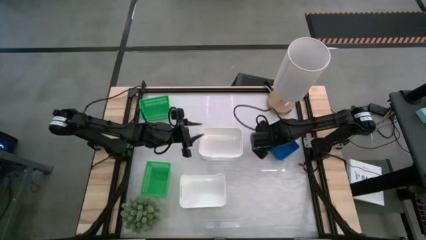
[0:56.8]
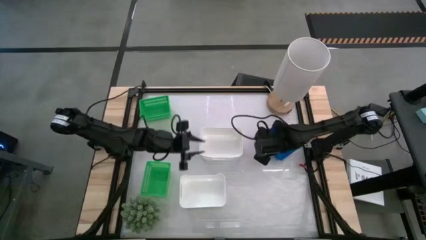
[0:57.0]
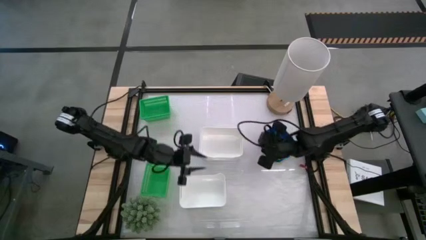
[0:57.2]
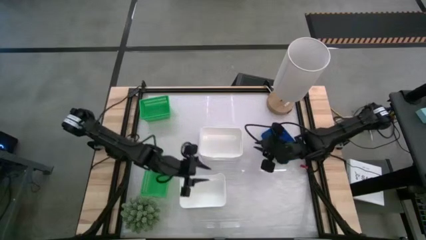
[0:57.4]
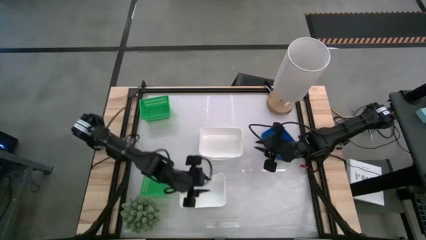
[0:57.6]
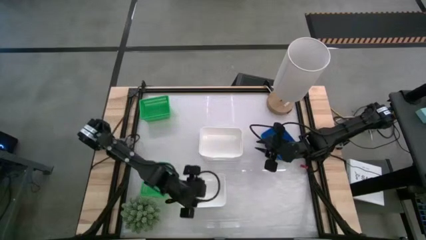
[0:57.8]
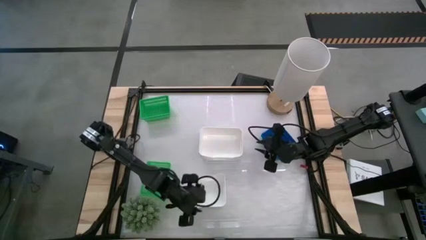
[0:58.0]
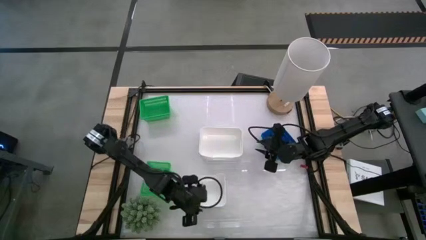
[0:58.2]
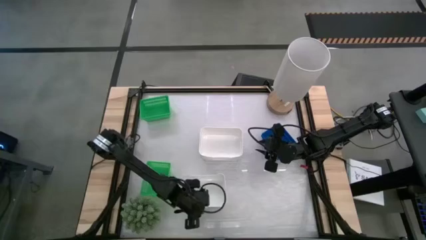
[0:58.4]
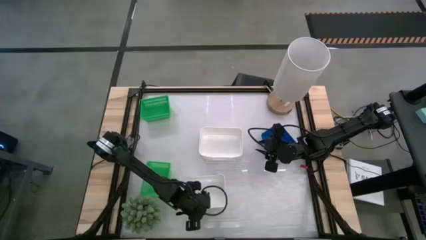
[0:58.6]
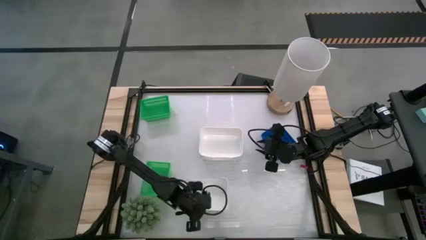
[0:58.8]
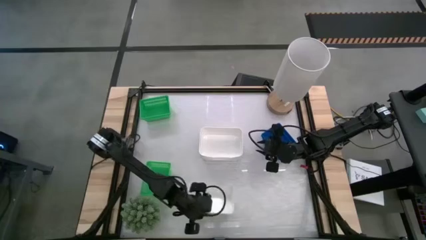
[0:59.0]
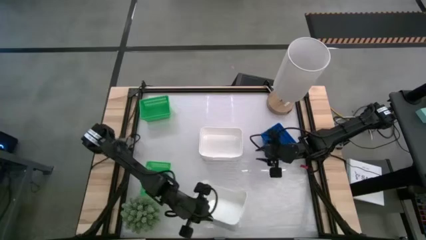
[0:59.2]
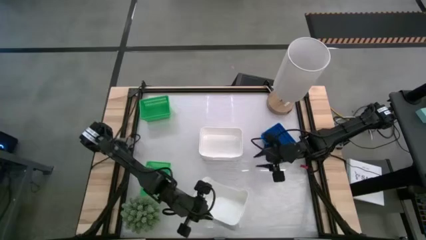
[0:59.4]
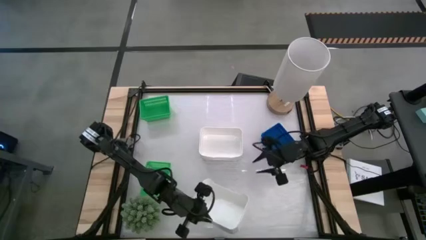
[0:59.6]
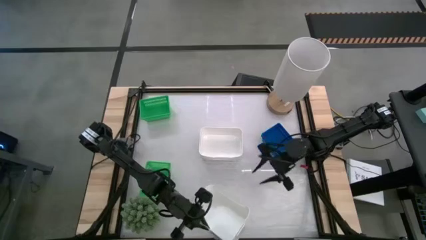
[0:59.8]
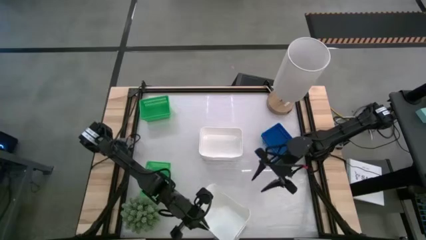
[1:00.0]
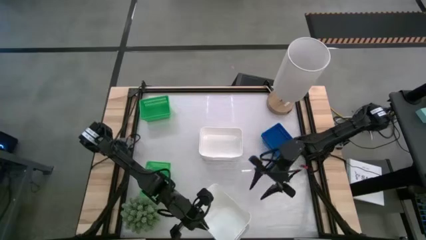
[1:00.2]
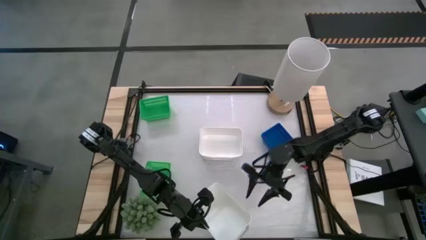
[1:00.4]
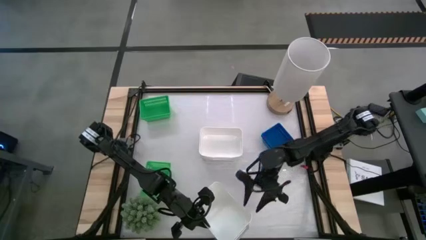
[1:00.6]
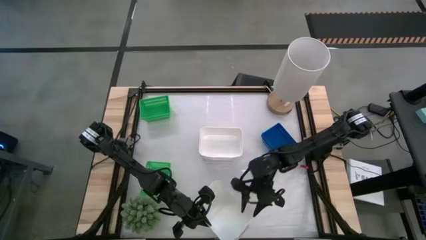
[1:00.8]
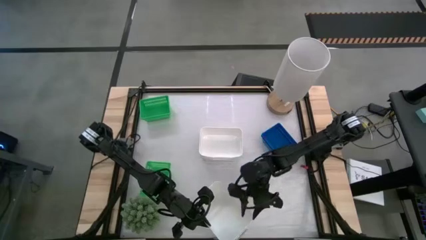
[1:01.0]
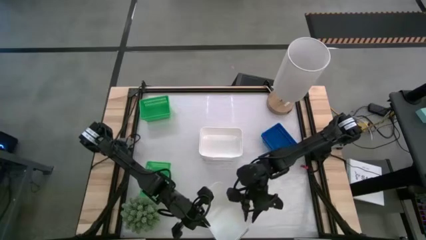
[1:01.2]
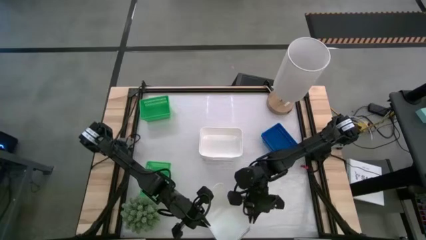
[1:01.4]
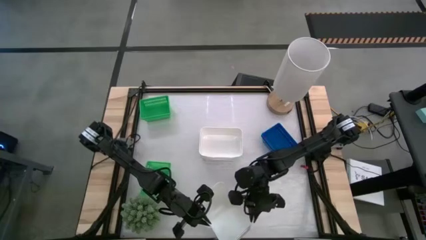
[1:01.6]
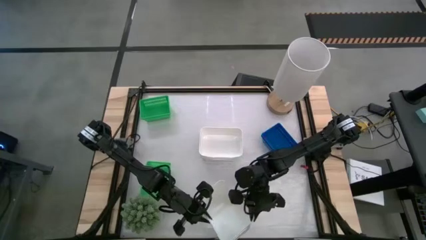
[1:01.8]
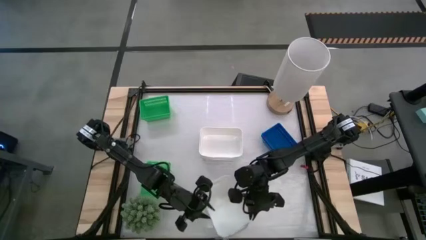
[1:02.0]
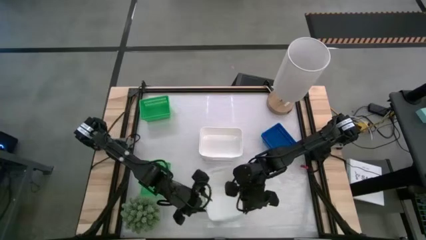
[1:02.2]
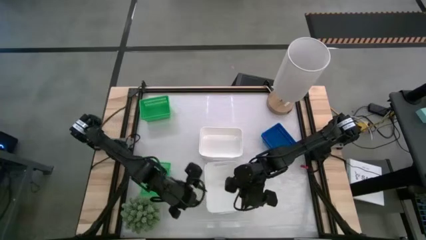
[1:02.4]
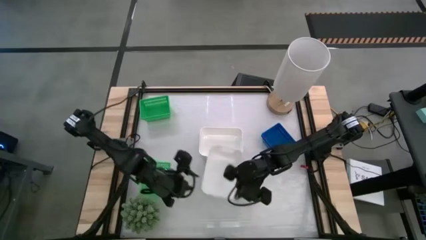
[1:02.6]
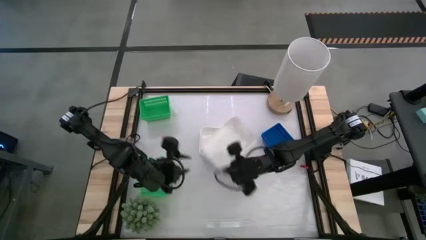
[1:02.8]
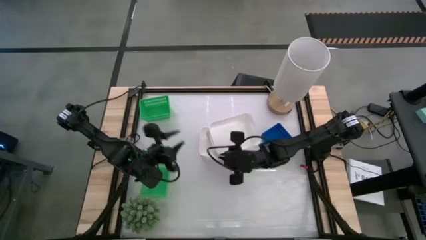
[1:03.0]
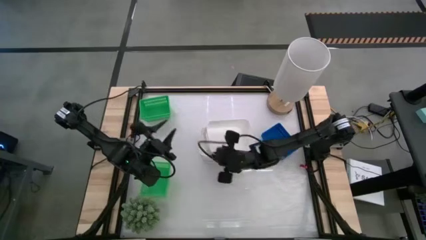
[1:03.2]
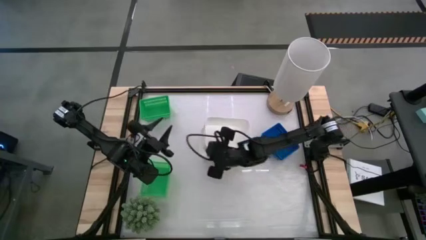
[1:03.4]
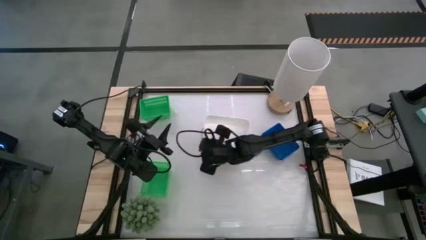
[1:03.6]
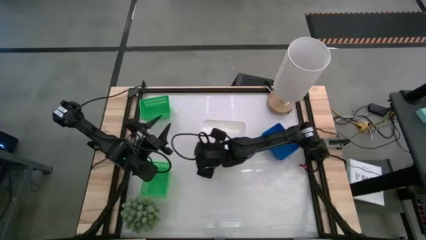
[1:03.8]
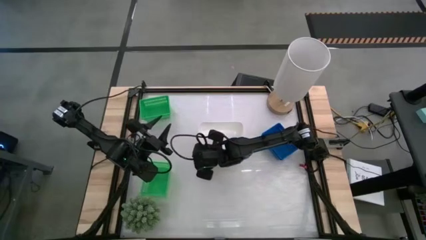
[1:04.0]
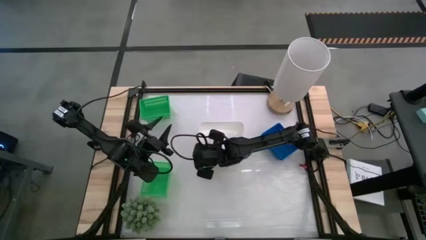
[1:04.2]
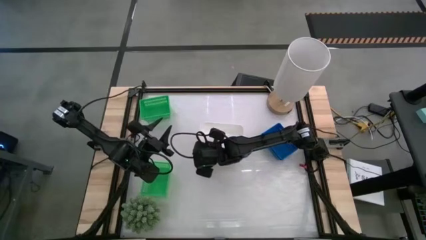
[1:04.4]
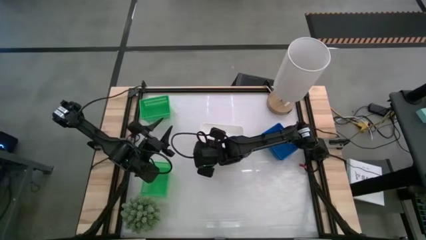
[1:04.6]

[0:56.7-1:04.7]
Stack the bottom white bin on the top white bins

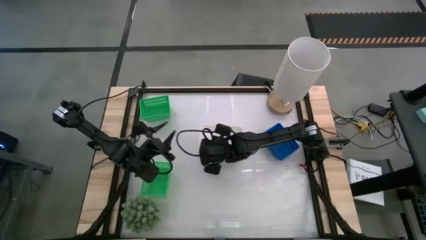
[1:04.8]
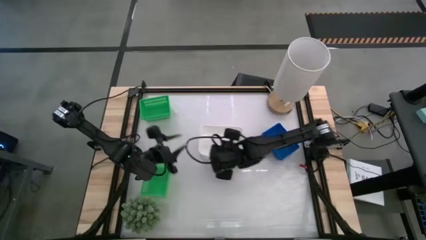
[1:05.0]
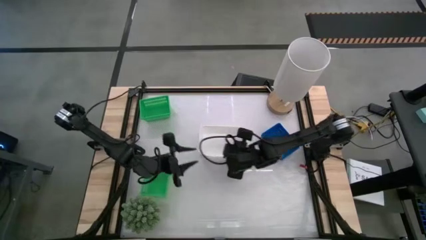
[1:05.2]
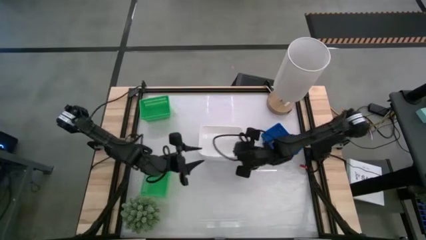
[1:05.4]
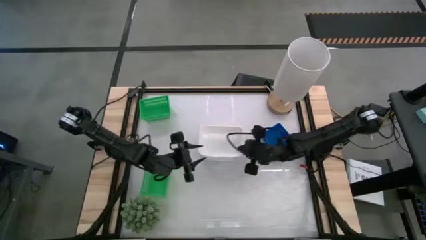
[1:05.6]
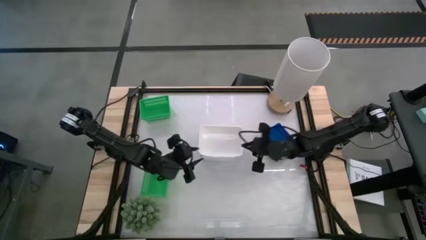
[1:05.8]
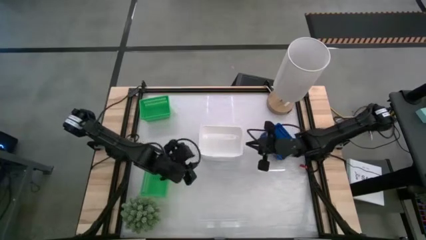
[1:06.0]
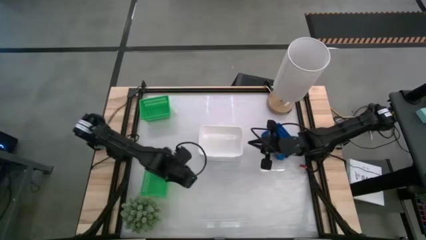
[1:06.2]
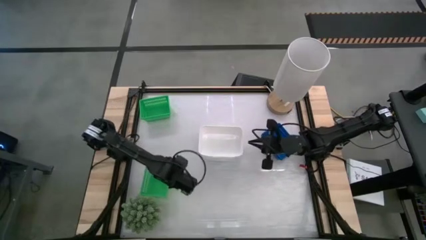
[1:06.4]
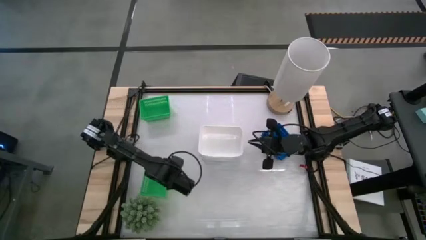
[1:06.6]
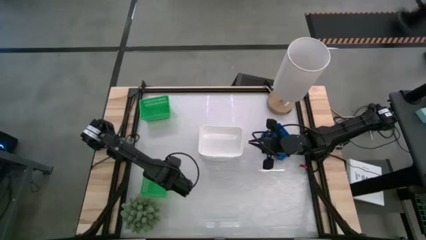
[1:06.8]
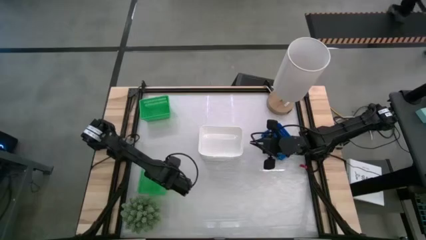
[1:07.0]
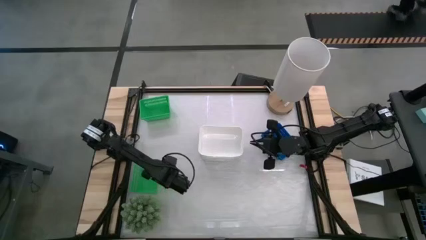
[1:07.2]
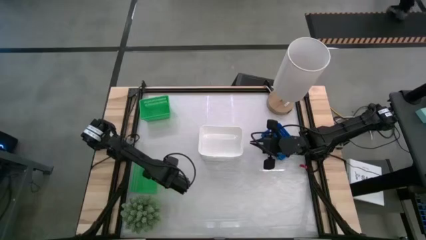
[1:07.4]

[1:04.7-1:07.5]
Stack the bottom green bin on the other green bins

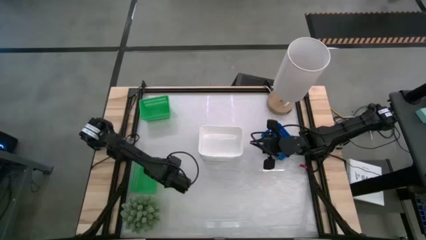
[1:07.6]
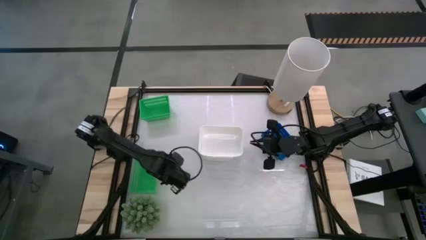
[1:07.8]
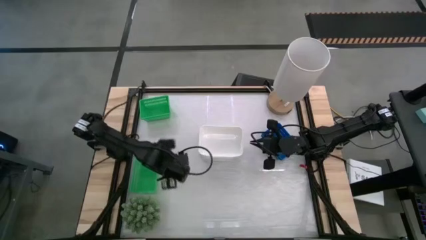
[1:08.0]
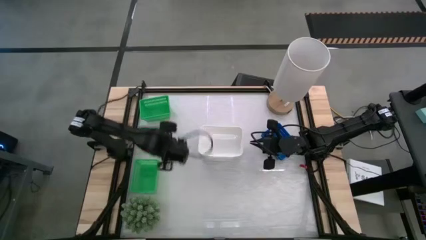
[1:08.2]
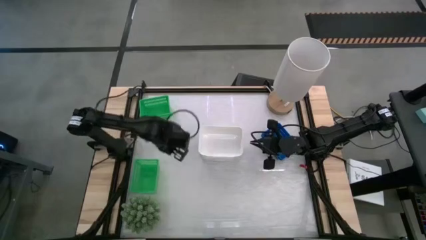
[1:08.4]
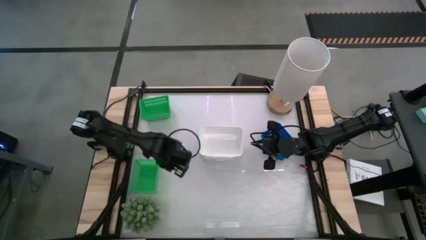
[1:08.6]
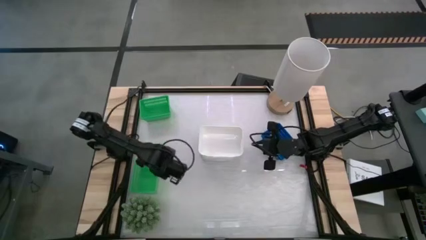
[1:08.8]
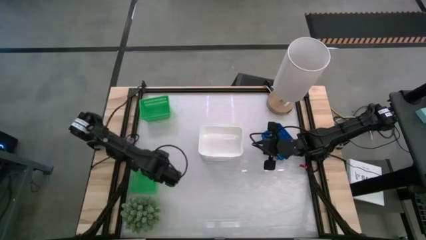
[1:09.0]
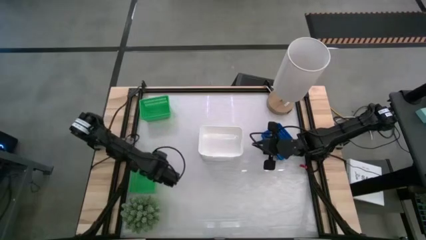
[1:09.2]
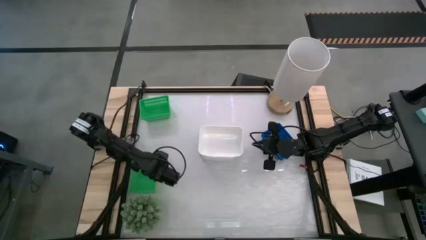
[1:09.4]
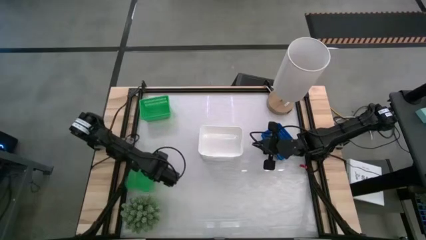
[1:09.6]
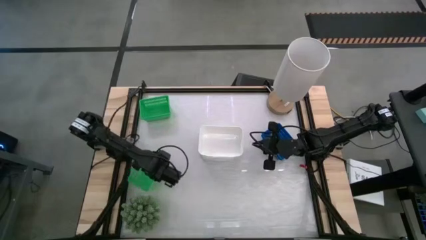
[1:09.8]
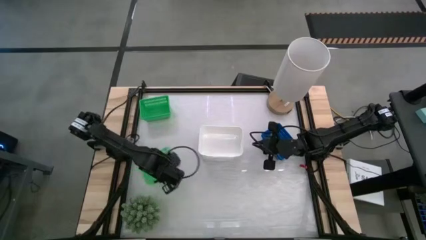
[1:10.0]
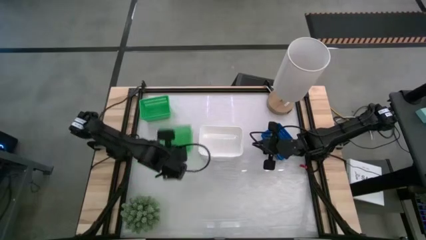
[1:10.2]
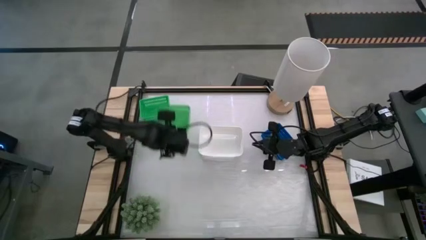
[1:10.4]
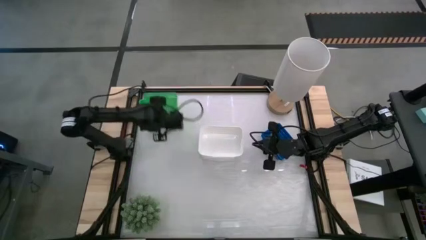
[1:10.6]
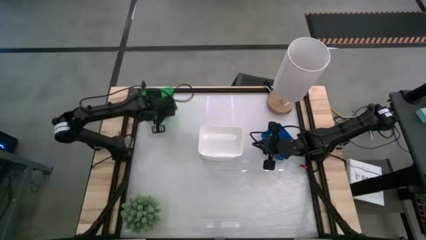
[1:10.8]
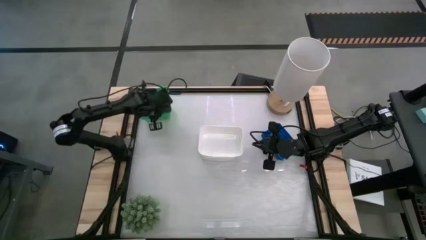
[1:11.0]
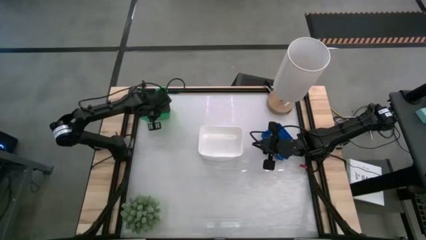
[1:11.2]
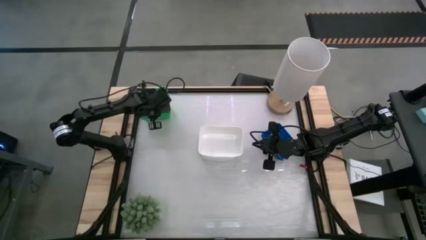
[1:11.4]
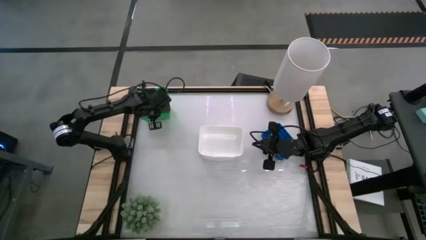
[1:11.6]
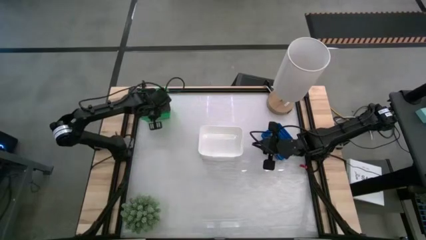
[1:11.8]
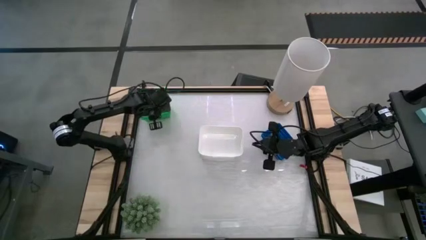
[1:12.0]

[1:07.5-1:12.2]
Stack the bottom green bin on the top green bins
